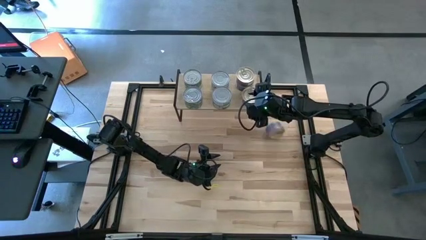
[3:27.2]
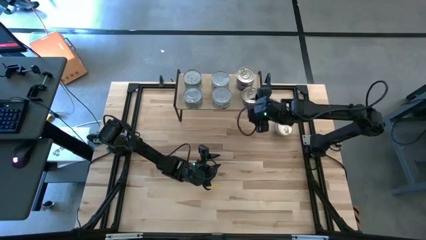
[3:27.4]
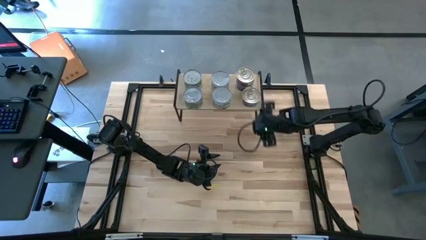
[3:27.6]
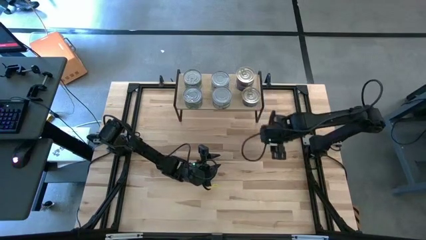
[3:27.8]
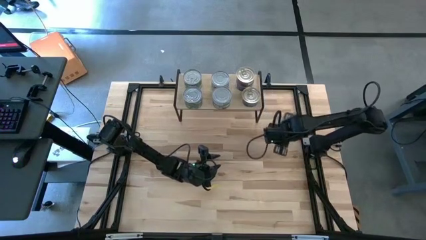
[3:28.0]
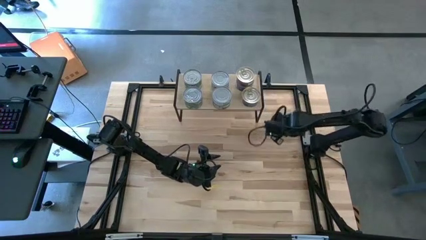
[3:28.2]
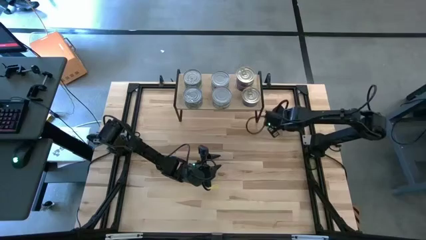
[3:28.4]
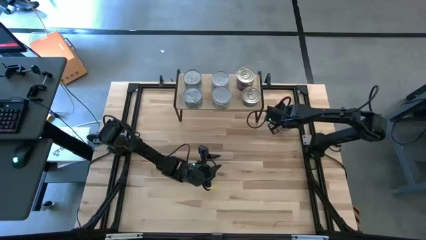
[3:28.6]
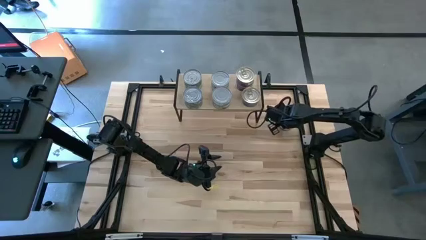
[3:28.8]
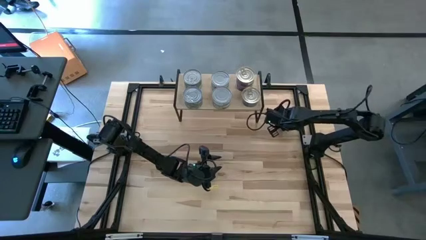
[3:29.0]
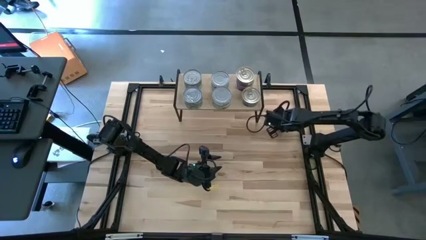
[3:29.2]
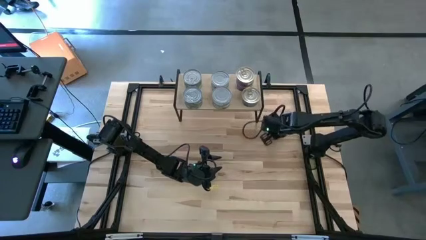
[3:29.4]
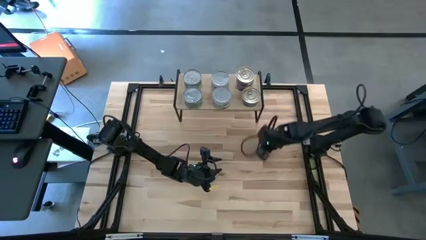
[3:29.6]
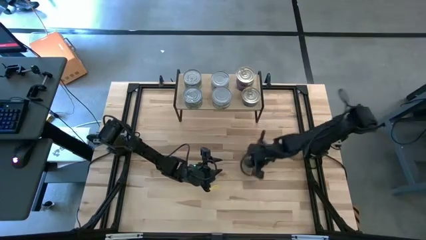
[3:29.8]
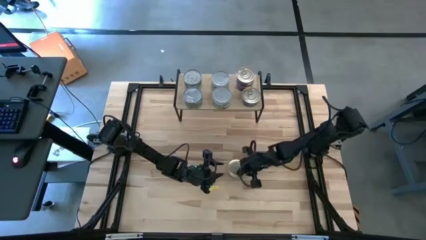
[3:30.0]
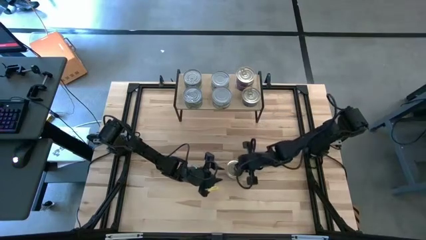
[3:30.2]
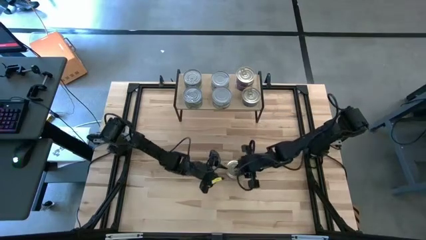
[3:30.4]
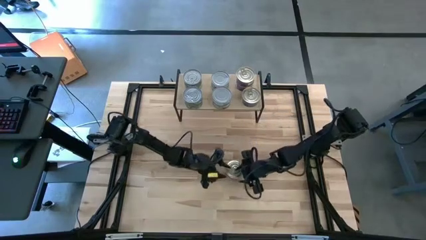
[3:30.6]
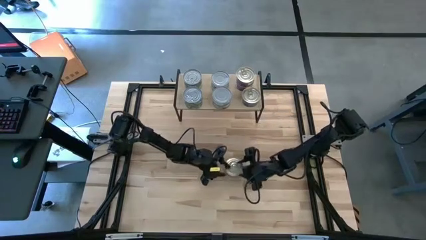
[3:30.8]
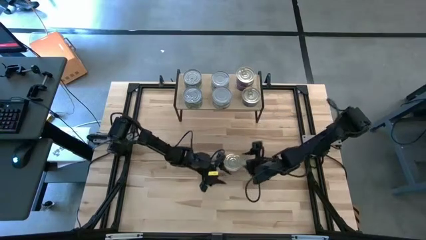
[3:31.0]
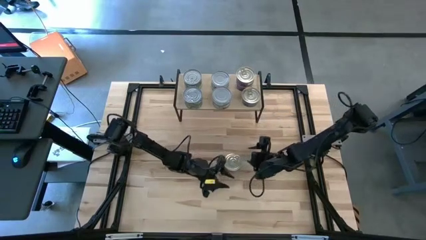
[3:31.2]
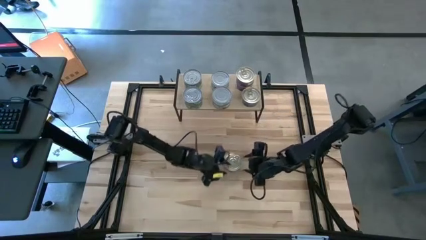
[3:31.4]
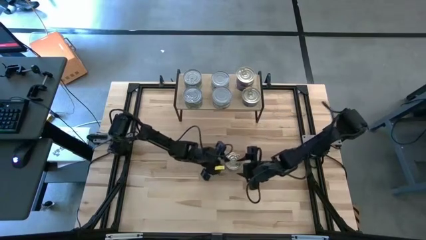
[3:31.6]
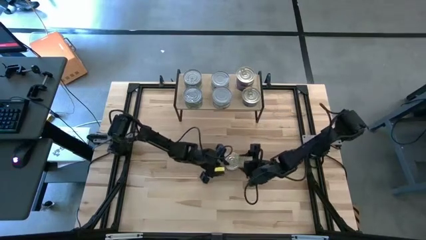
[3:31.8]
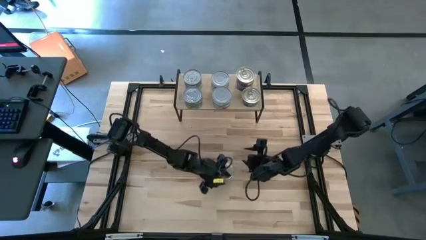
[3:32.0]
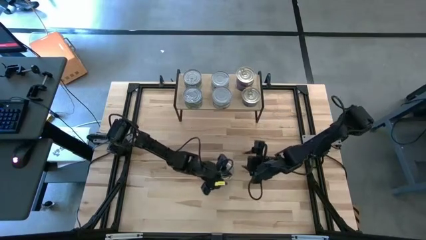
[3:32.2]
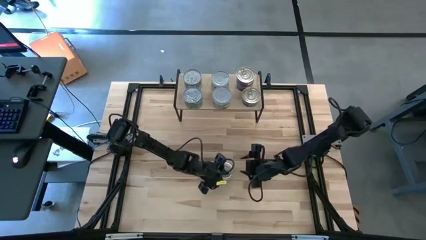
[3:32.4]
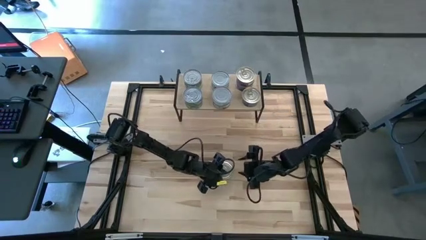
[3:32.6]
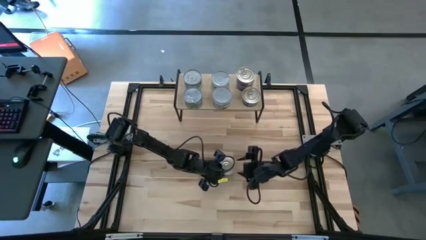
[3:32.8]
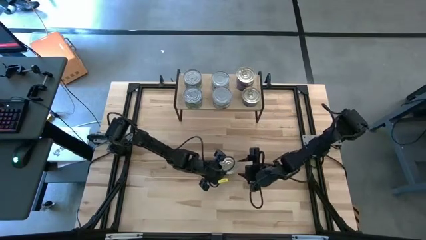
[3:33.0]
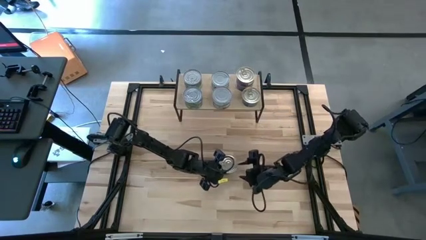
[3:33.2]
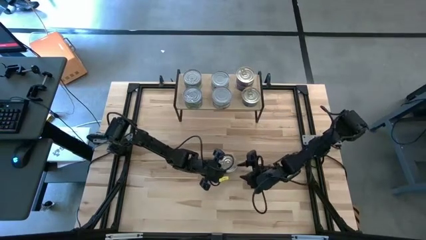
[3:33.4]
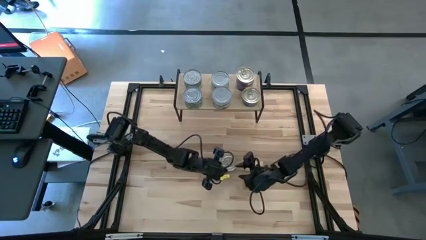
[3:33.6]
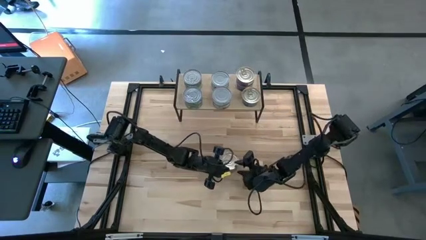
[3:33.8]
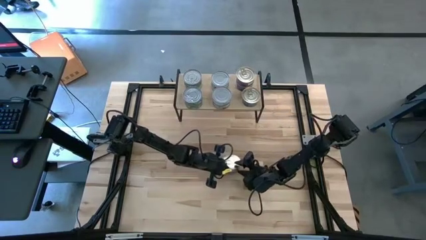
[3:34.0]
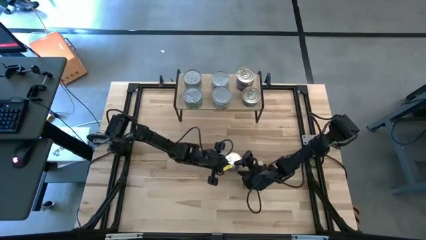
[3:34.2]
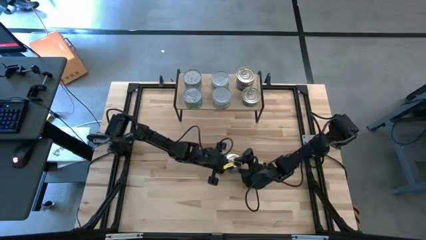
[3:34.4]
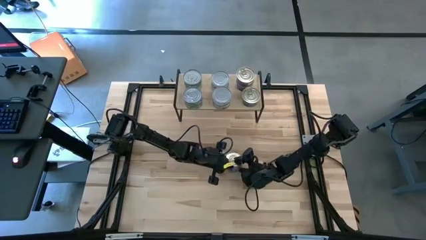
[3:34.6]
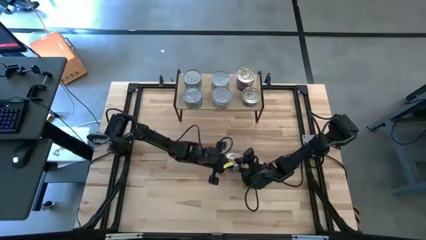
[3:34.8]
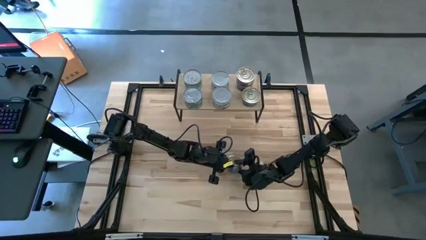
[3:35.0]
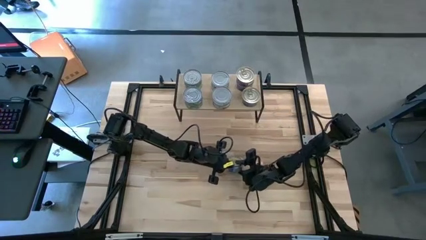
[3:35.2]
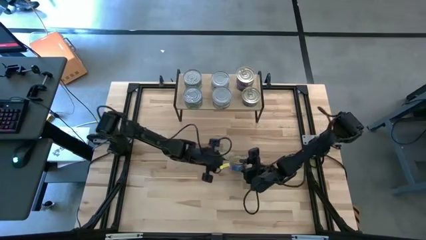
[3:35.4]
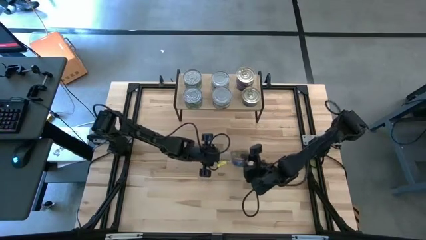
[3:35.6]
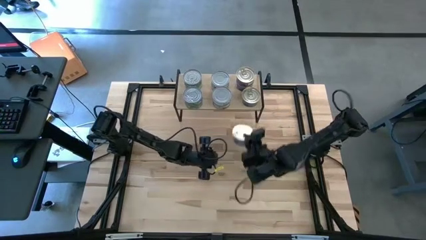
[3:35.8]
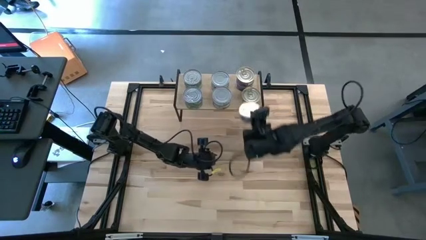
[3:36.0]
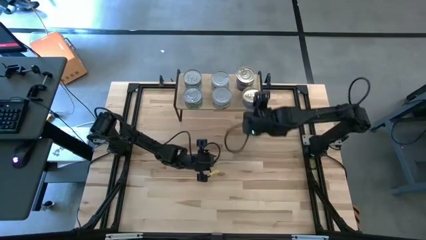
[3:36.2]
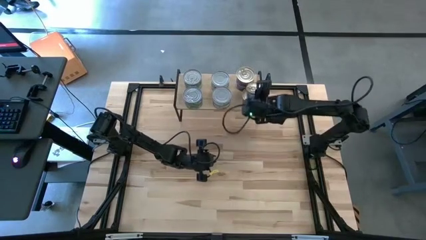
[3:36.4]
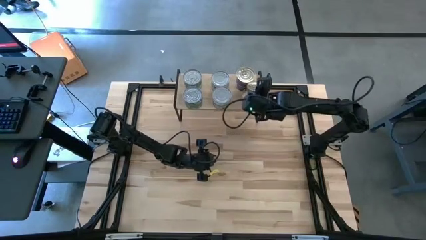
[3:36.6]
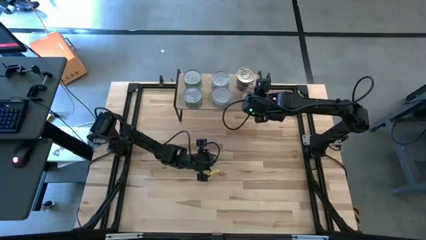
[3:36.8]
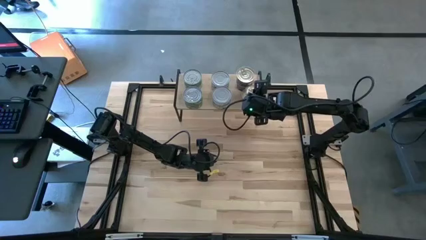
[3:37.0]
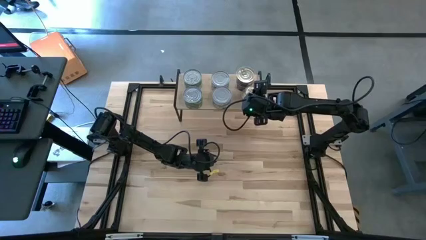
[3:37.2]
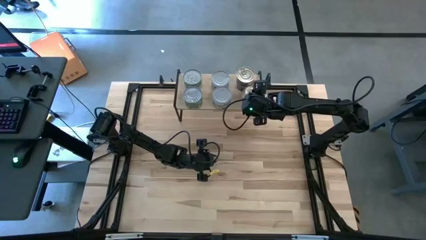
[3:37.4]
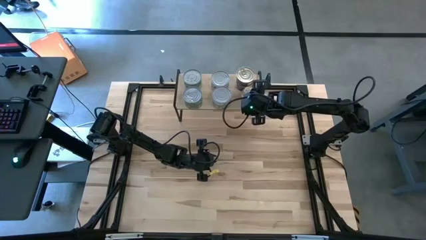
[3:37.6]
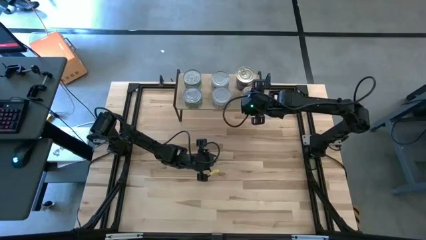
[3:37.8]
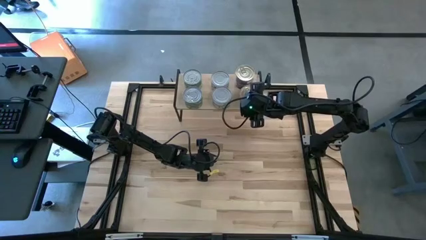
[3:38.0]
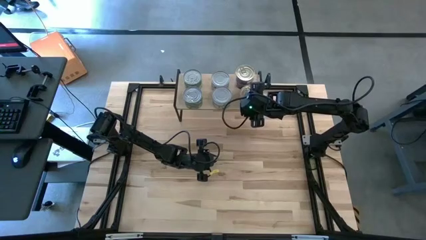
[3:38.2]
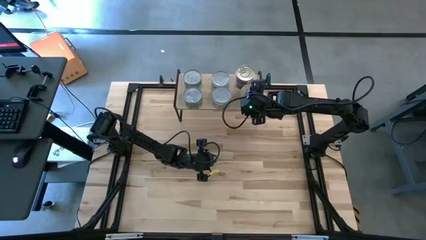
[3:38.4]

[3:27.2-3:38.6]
Task: Stack canned seafood by type on shelf
Stack the blue tuna can on top of the bottom blue tuna can on the shelf

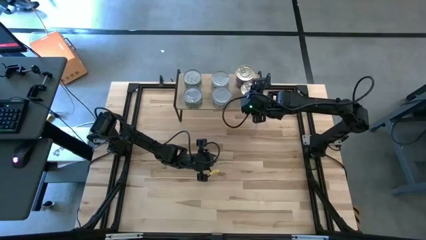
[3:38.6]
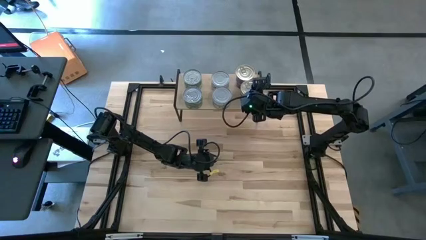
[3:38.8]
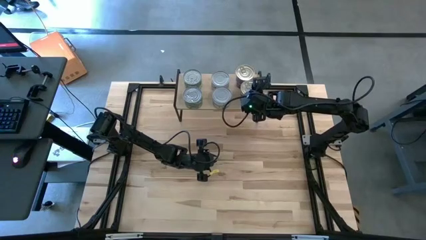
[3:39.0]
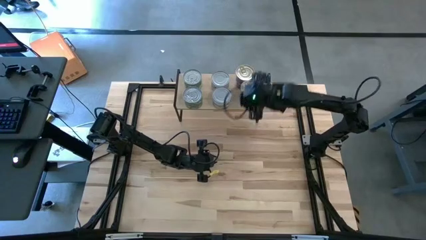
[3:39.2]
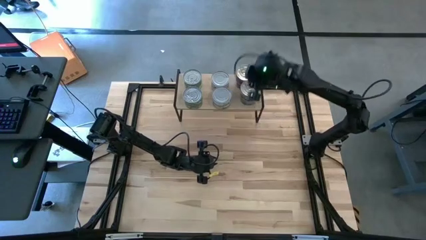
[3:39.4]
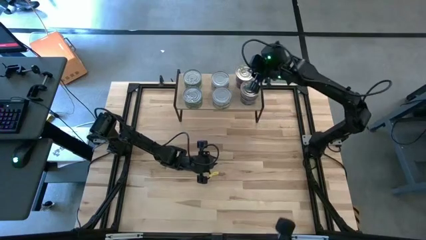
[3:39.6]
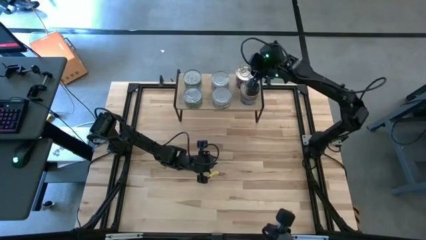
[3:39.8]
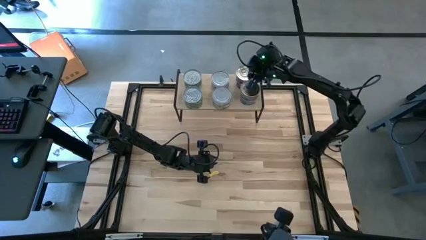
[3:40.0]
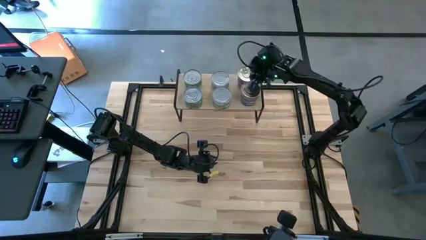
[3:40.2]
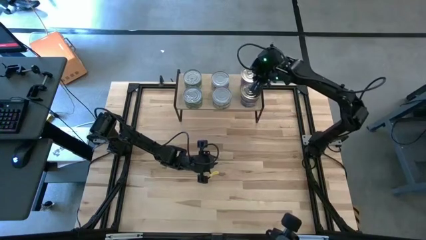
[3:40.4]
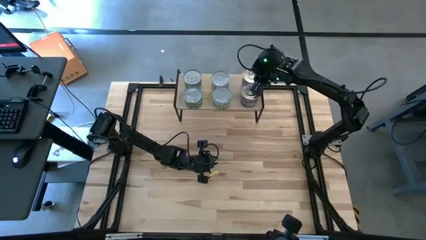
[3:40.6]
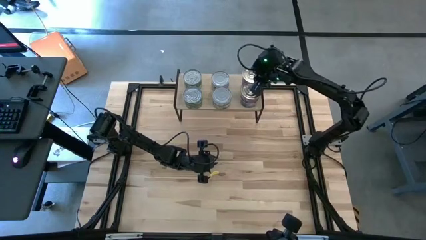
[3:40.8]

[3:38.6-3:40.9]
Adjust the top stacked blue cans on the shelf

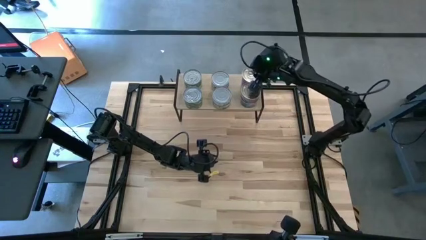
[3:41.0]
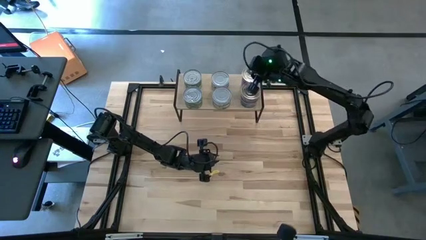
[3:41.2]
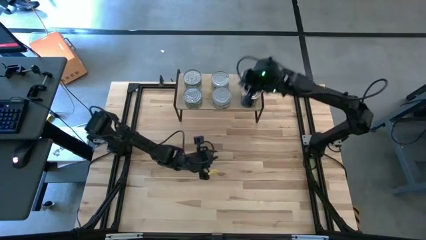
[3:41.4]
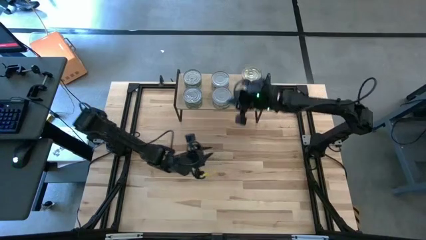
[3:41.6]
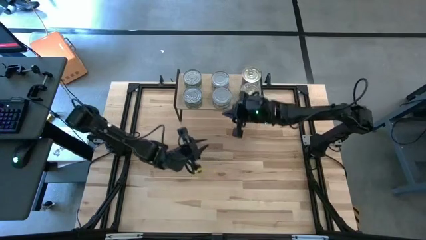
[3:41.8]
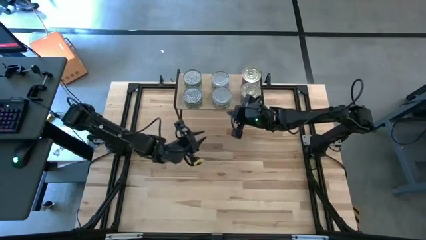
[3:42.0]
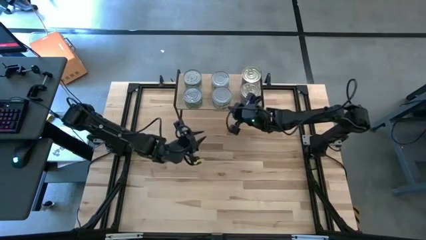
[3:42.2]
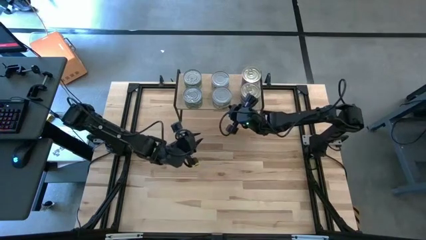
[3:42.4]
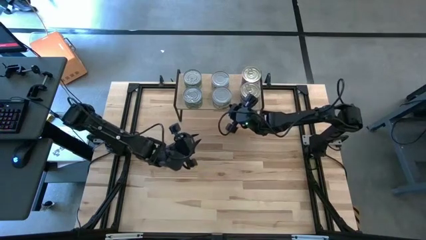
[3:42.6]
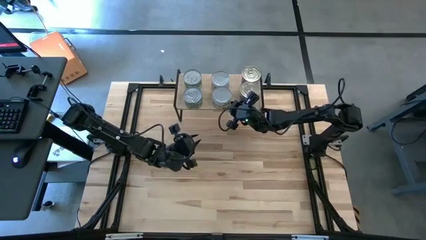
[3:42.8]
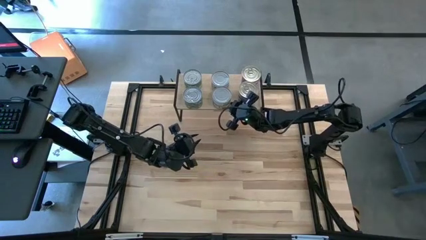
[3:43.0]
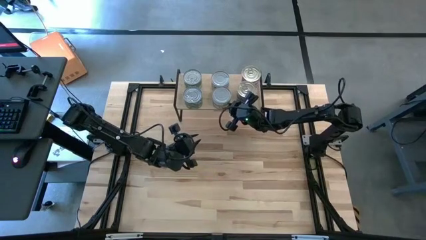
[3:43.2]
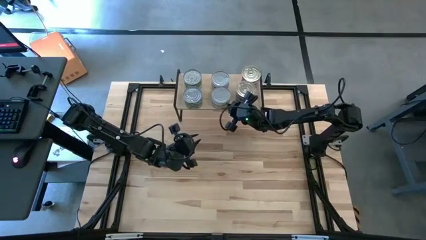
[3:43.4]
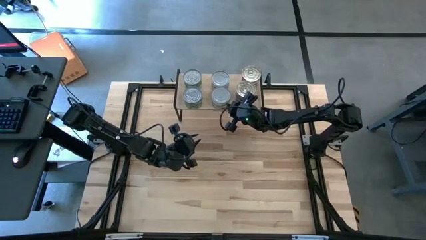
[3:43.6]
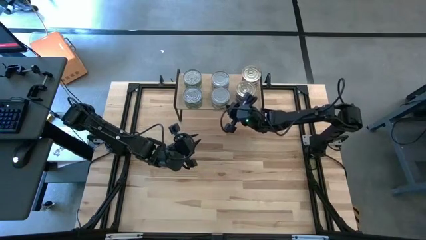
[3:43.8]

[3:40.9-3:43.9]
Adjust the bottom stacked light green cans on the shelf

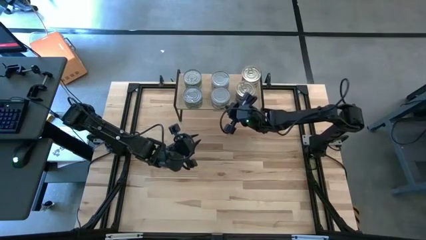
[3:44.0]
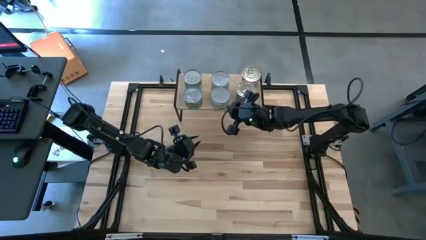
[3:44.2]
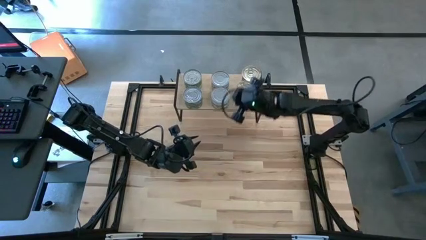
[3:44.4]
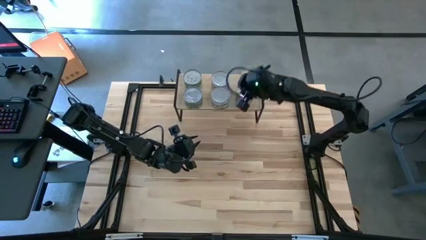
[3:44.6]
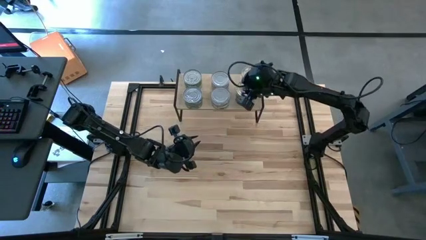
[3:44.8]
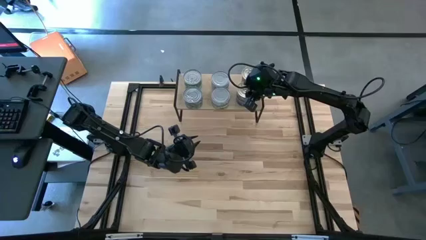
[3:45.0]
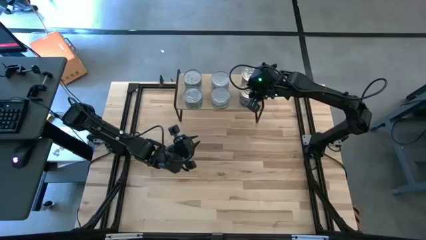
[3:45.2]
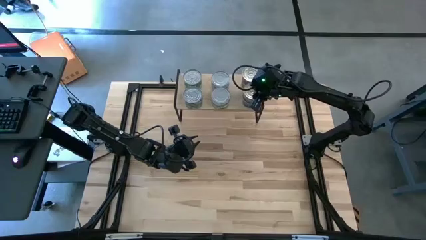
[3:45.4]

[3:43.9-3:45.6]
Adjust the bottom stacked blue cans on the shelf
